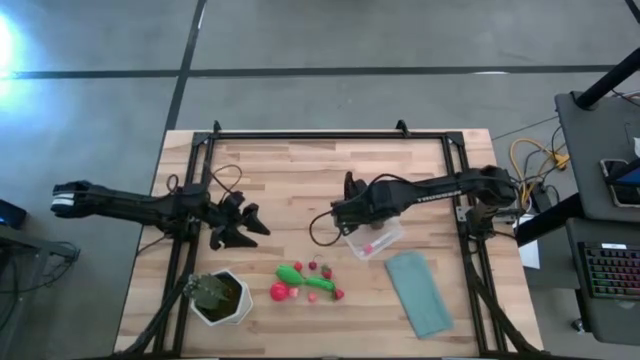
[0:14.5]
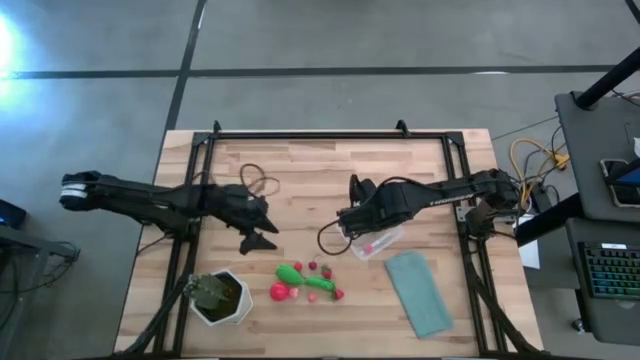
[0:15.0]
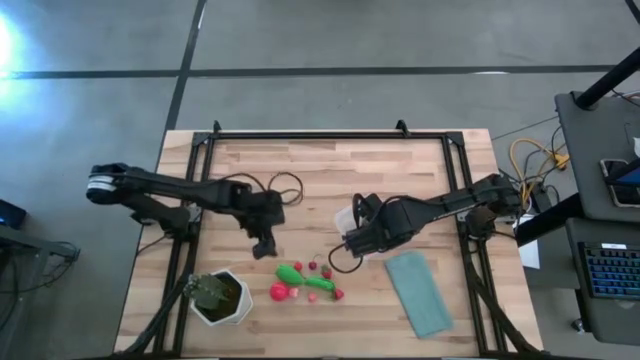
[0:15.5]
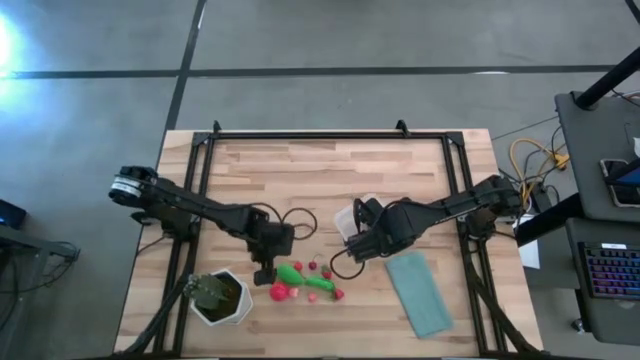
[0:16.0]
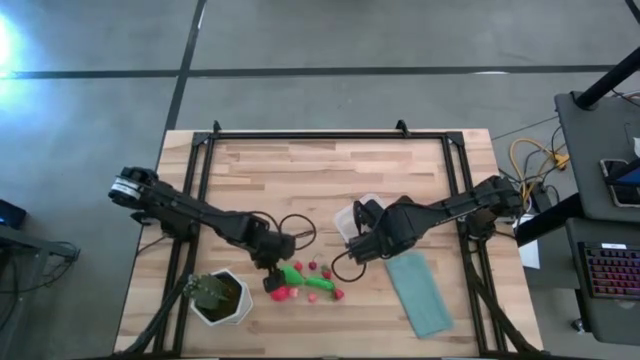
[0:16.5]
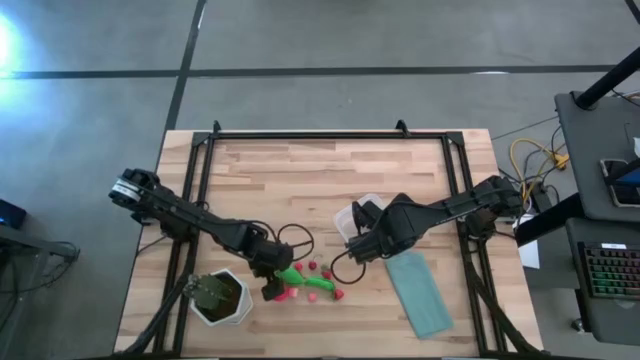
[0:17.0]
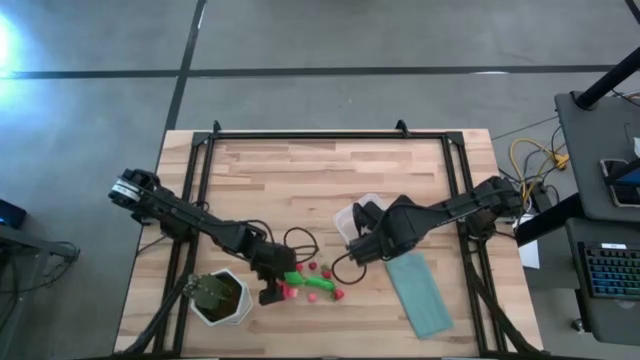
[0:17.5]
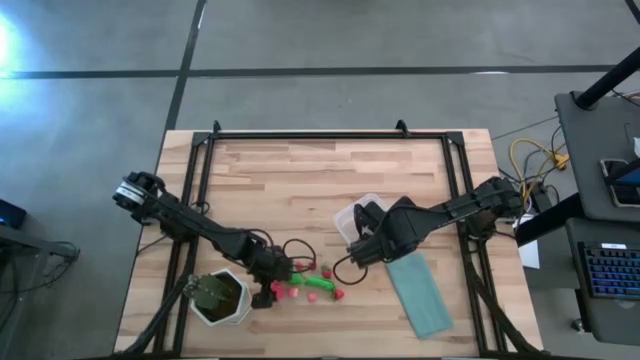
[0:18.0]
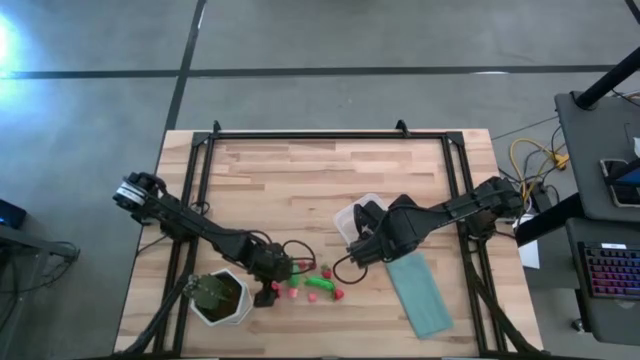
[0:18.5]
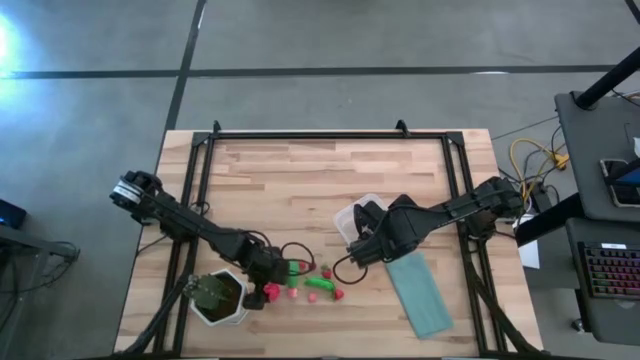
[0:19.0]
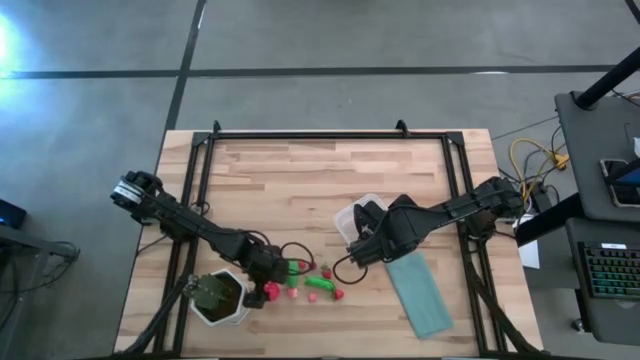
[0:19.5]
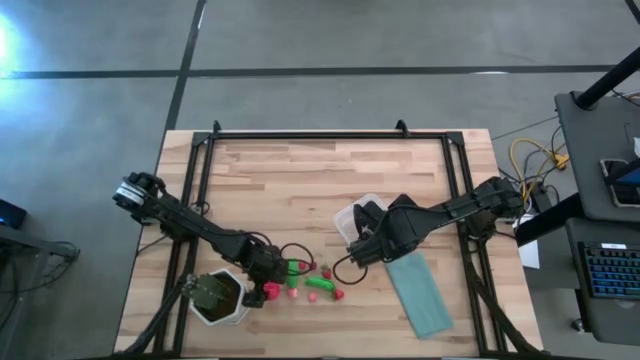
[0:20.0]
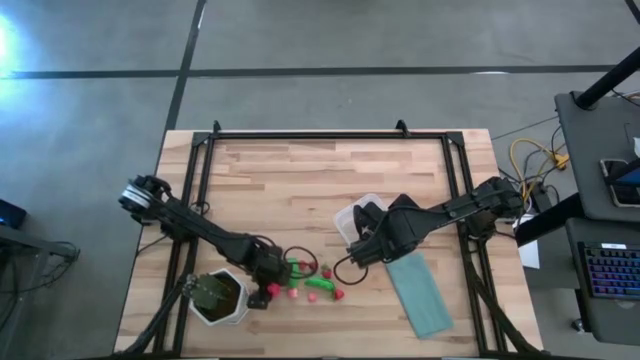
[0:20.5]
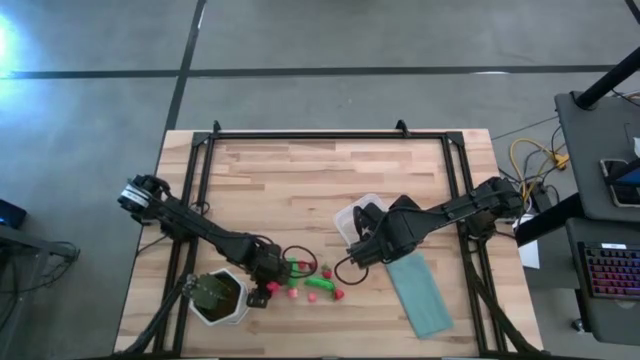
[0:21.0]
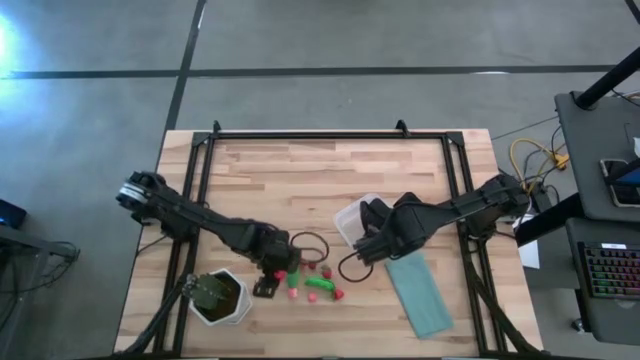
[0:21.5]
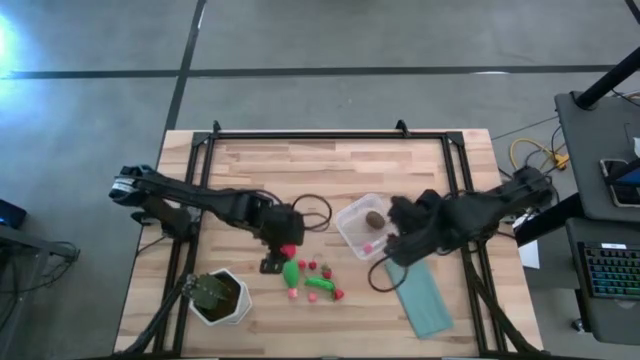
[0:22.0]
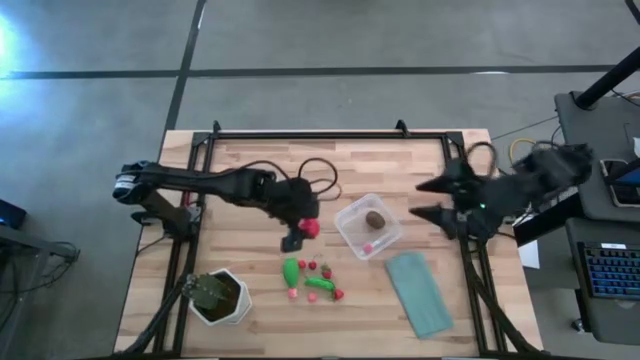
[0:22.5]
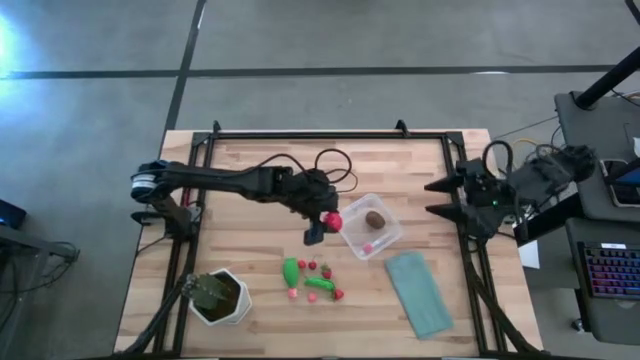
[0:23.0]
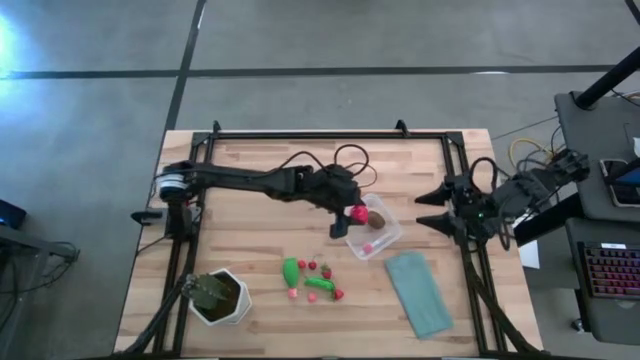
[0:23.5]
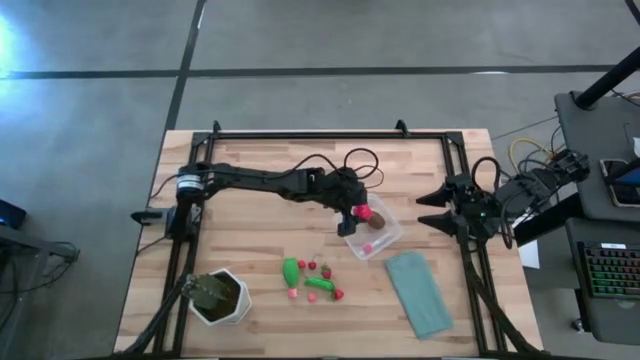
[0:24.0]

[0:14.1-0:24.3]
Task: Pick and placing Produce into tupperware
Put the red tomato into the transparent bin

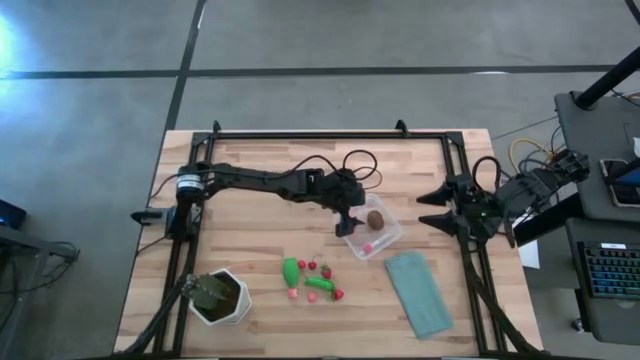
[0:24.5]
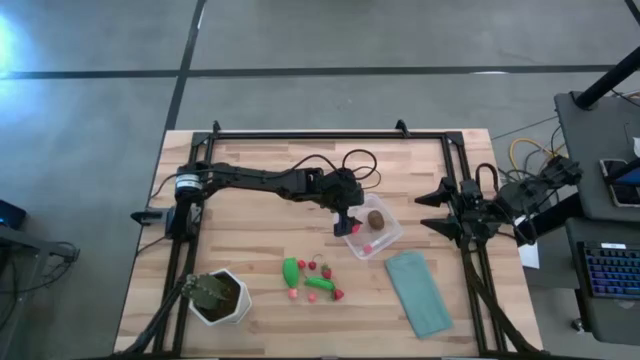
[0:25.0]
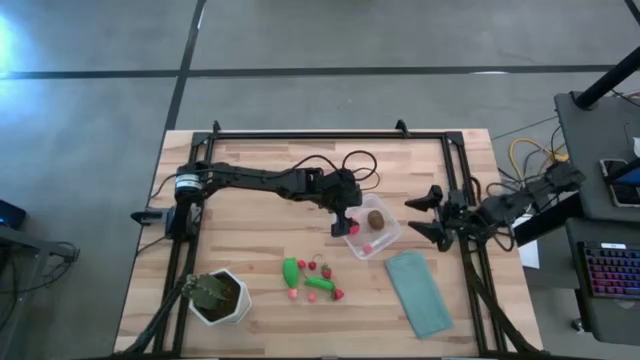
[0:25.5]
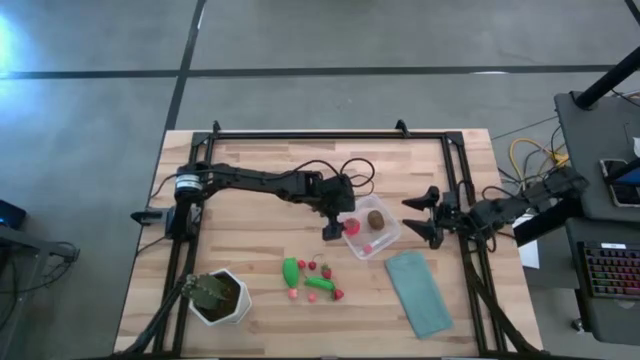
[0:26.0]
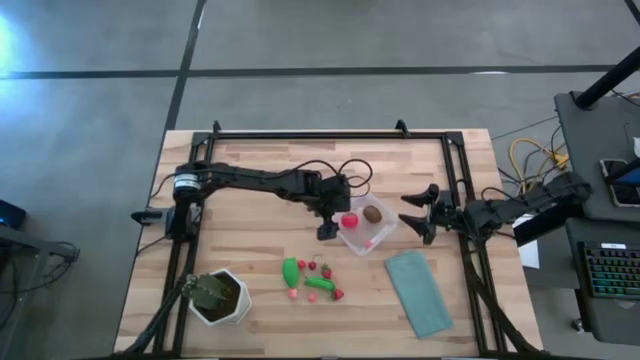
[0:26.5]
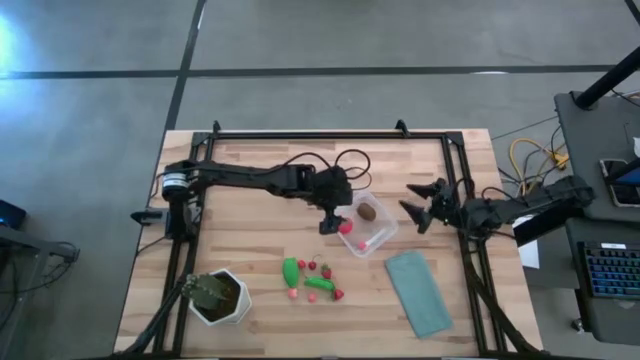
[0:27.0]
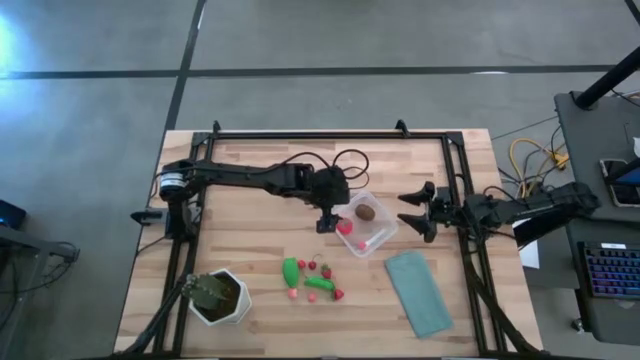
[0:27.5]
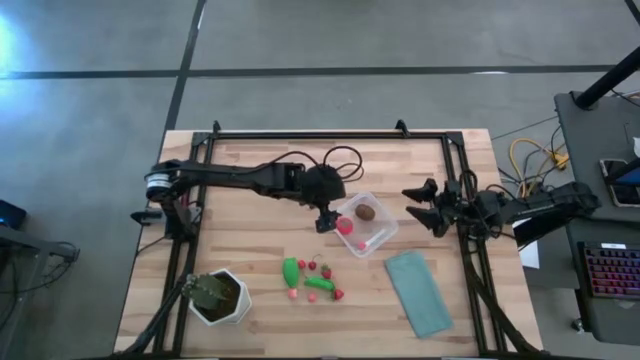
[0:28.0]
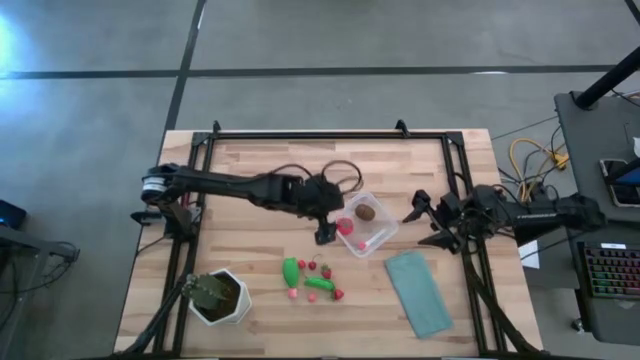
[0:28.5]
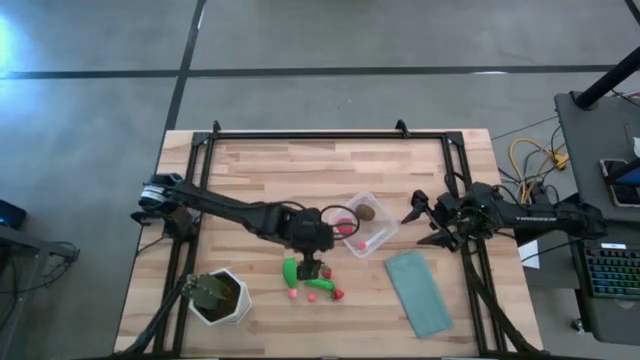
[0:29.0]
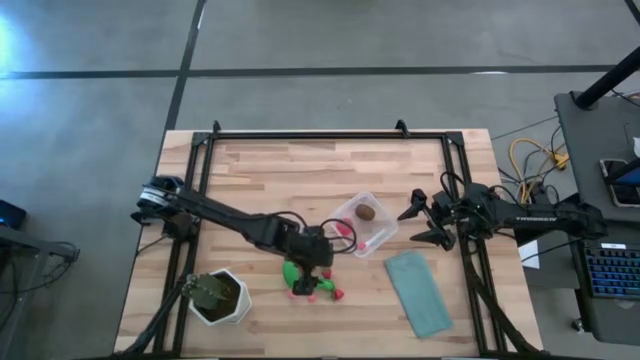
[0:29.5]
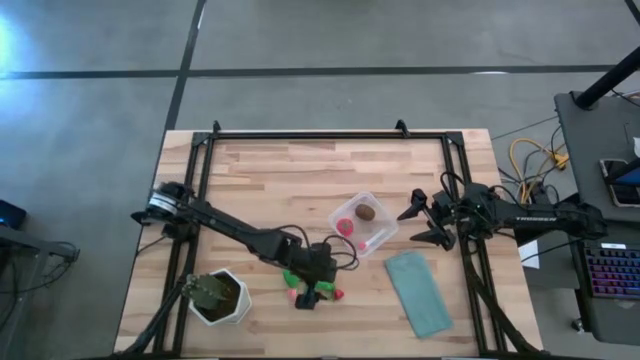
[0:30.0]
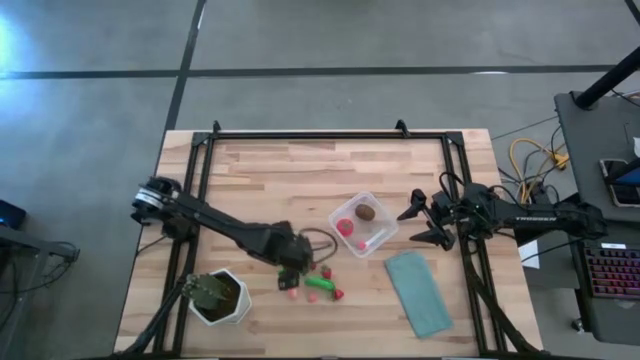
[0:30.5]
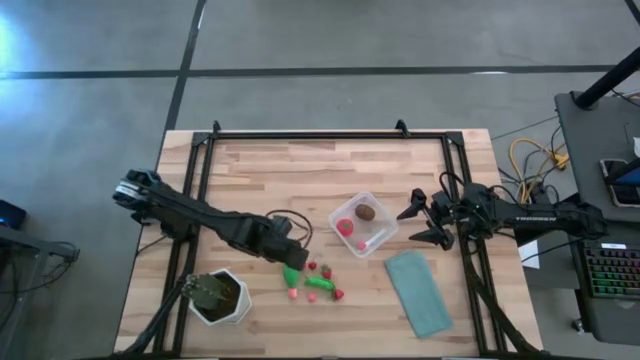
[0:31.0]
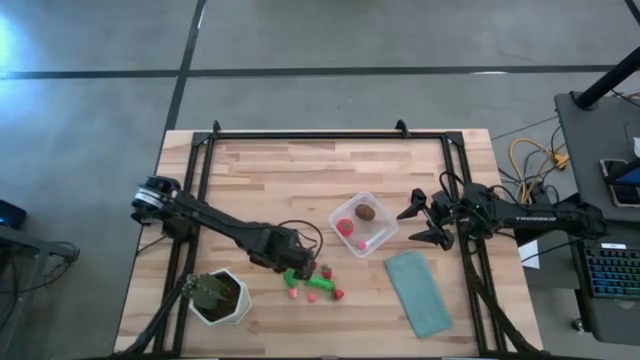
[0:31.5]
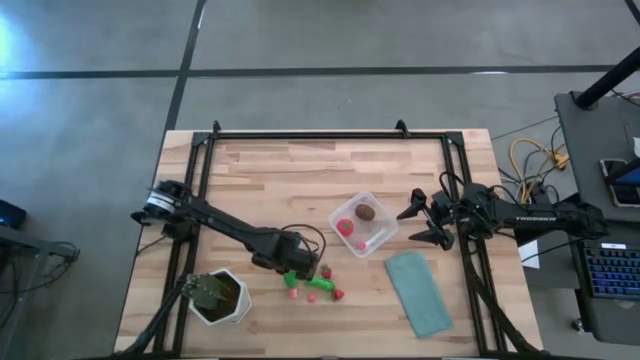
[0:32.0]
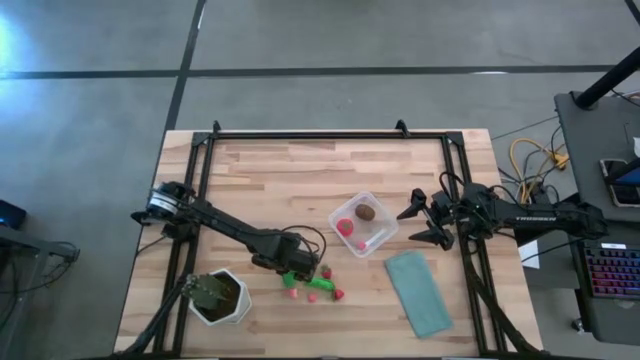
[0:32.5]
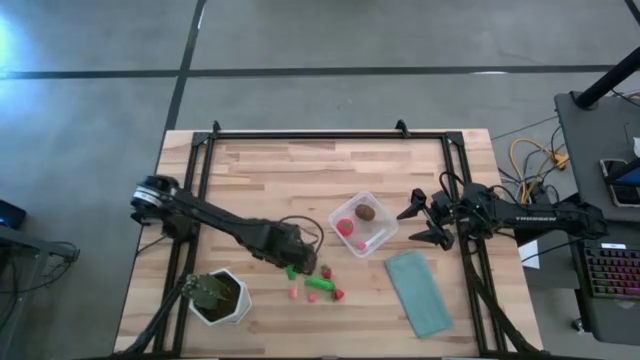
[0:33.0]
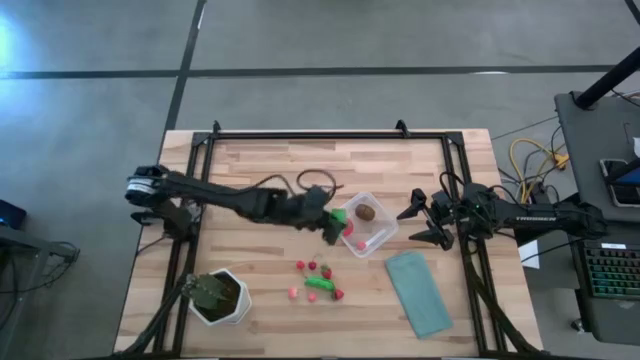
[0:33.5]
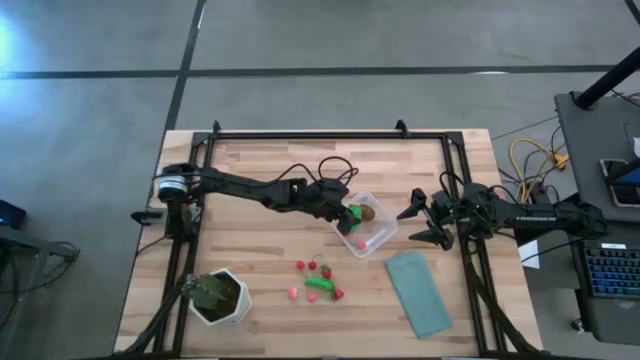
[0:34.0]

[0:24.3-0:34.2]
Put the green corn into the transparent bin

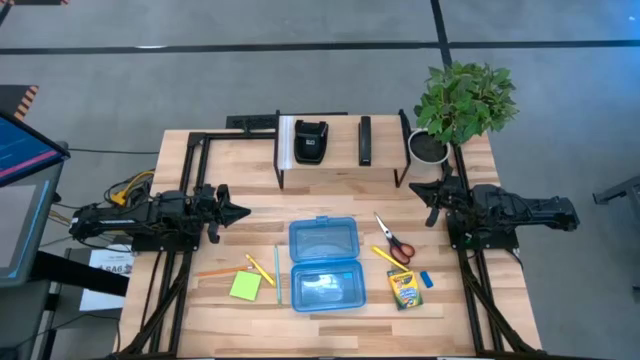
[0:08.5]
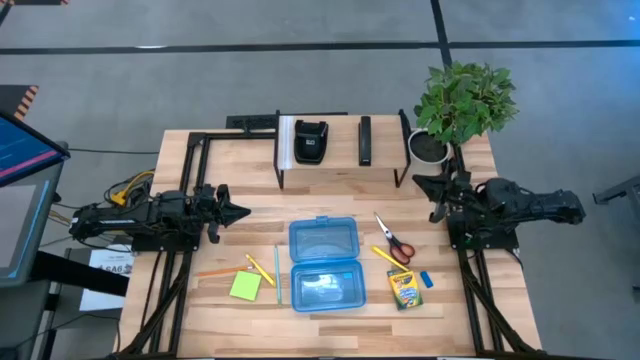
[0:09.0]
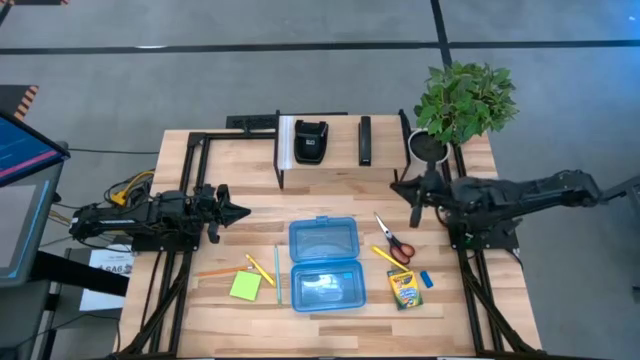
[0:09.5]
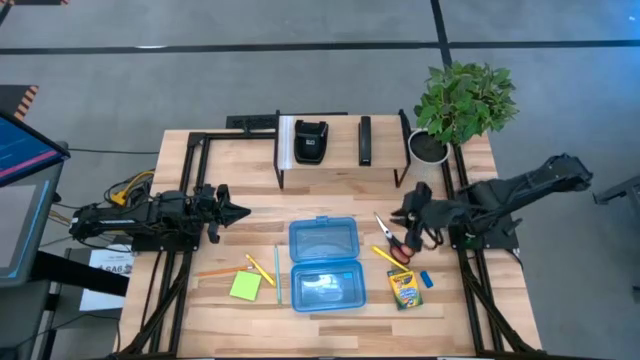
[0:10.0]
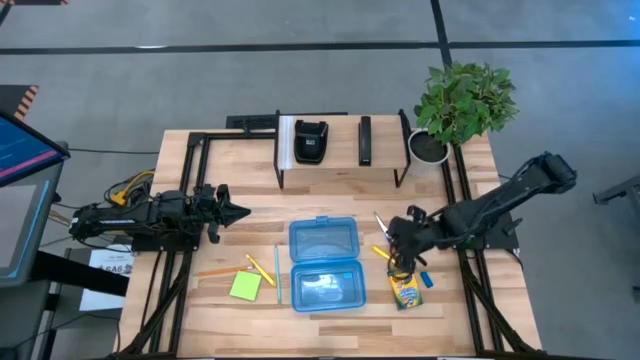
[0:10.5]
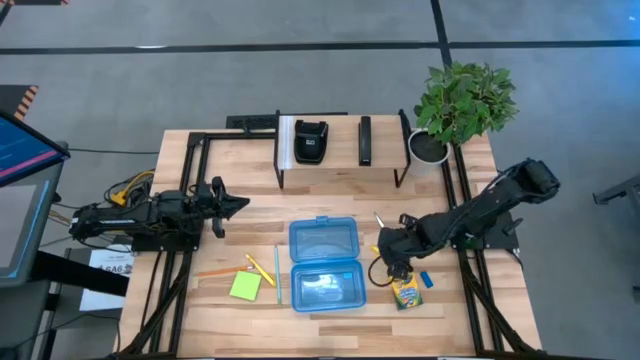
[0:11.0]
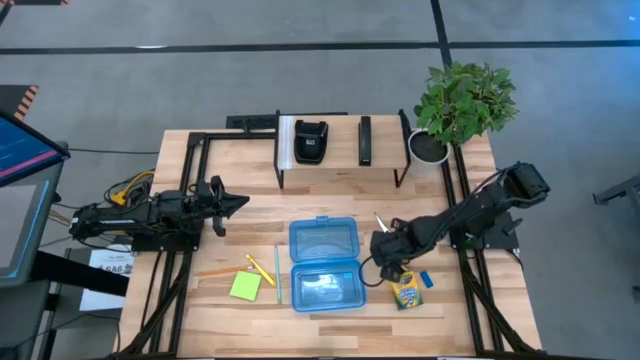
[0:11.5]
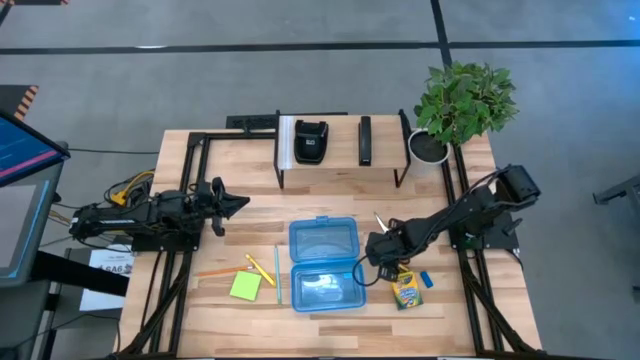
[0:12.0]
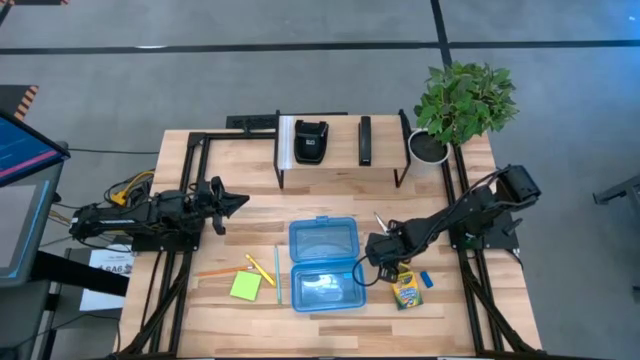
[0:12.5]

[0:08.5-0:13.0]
Task: Pack school essentials
Put the right yellow pen into the blue supply box
